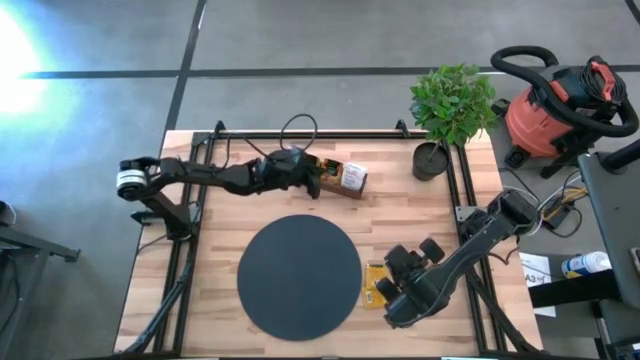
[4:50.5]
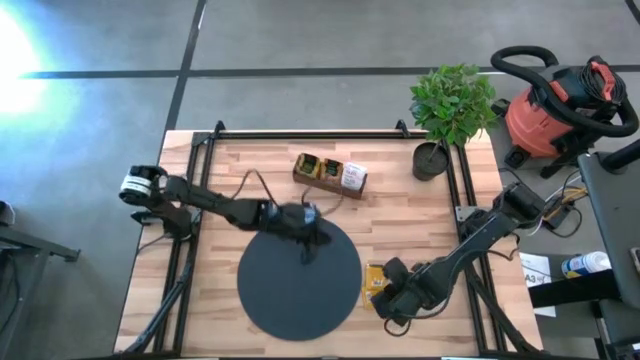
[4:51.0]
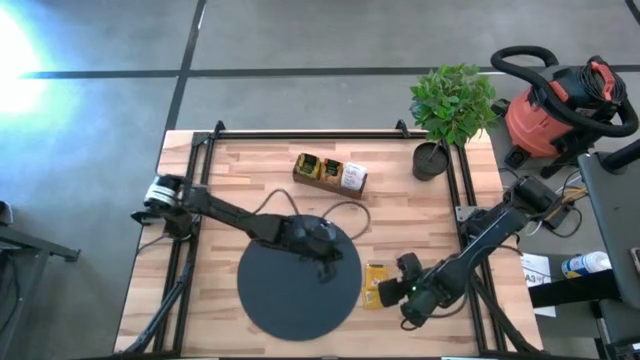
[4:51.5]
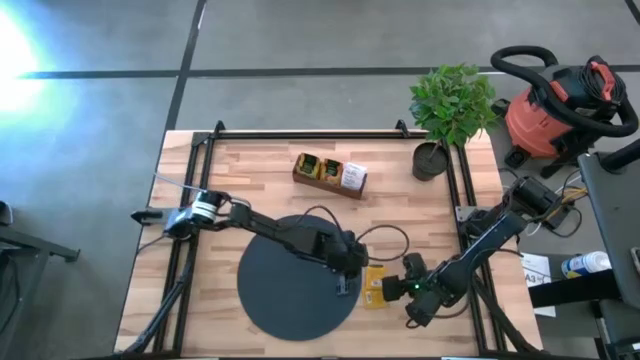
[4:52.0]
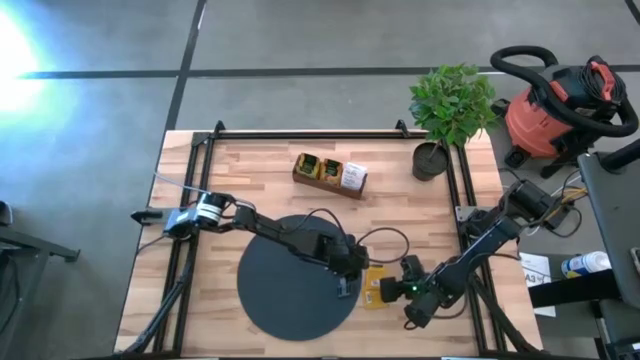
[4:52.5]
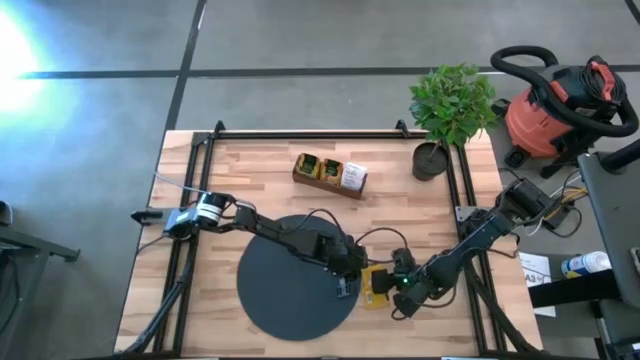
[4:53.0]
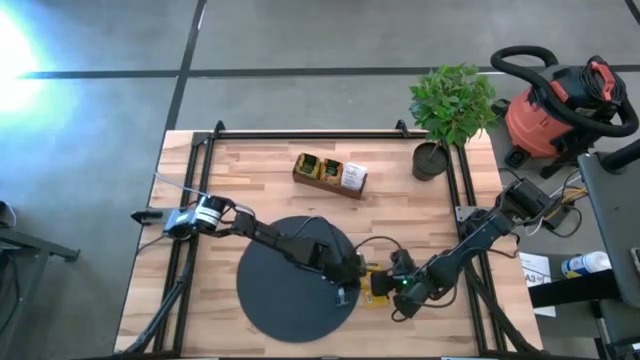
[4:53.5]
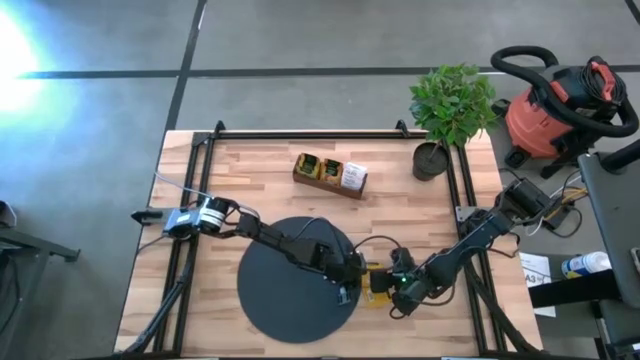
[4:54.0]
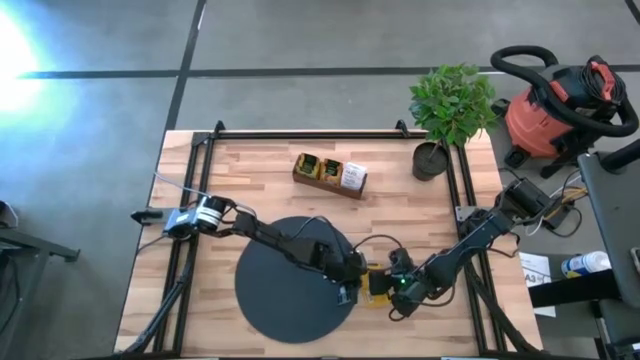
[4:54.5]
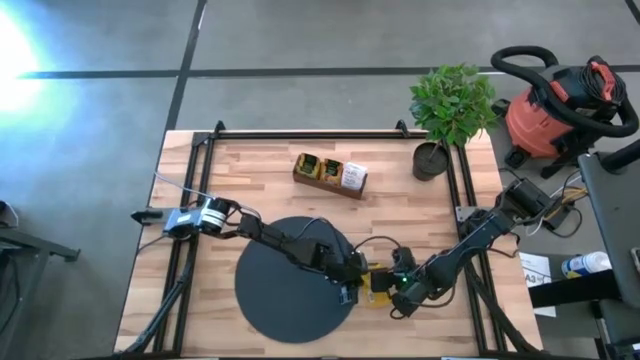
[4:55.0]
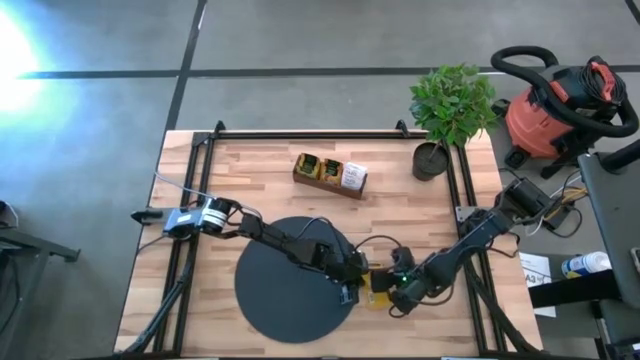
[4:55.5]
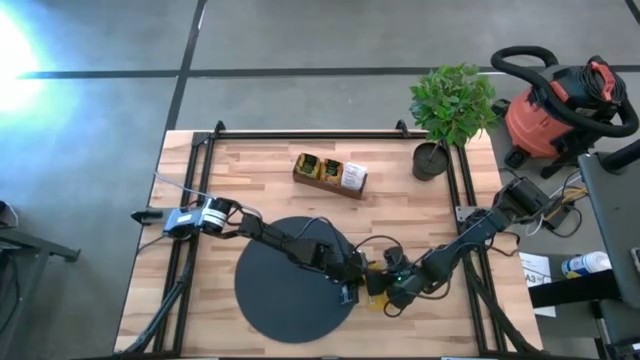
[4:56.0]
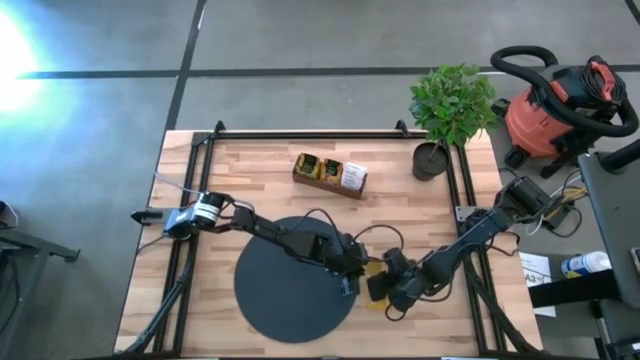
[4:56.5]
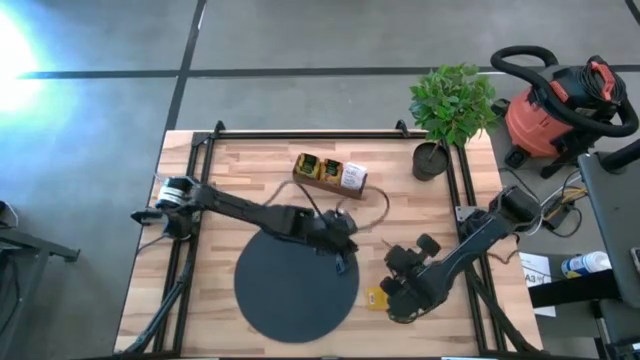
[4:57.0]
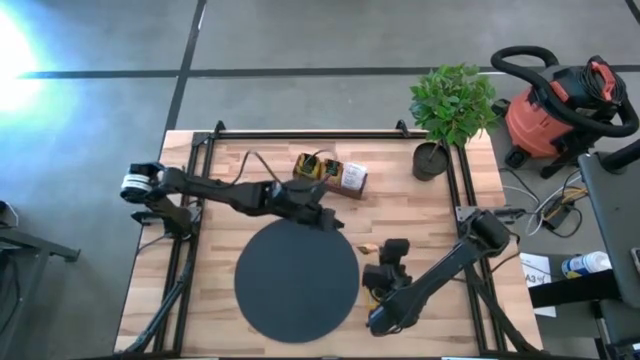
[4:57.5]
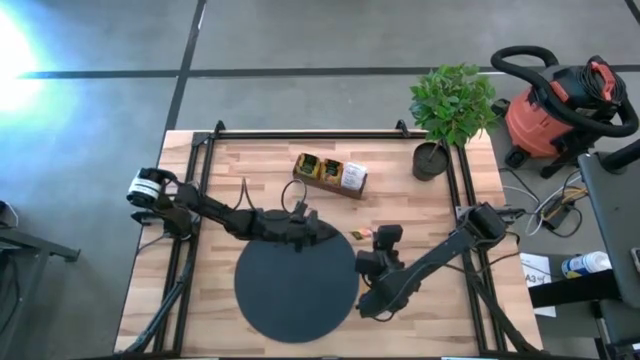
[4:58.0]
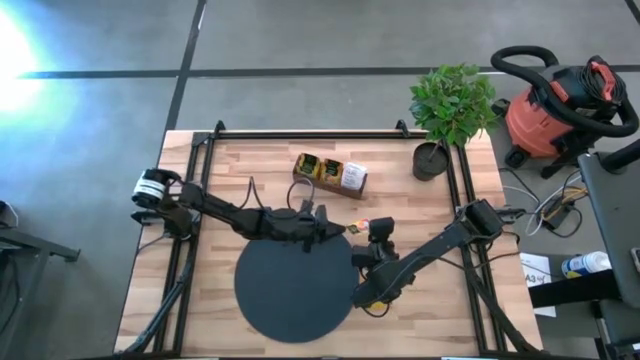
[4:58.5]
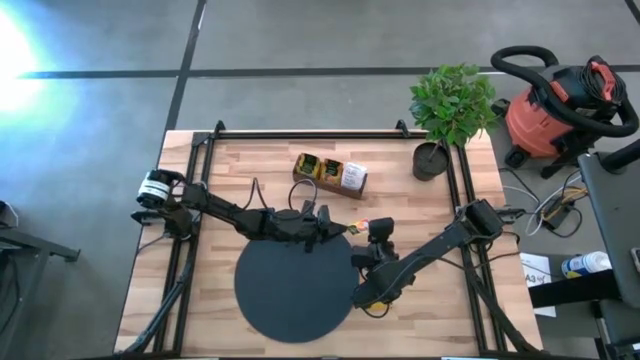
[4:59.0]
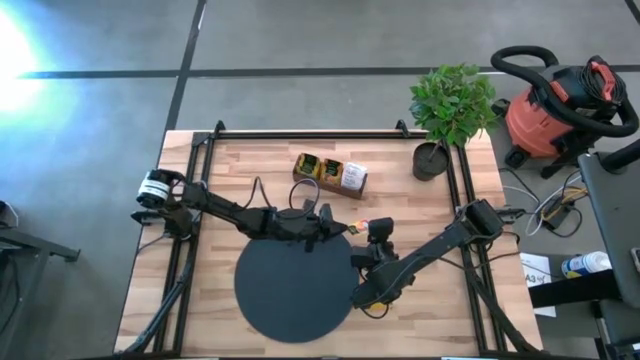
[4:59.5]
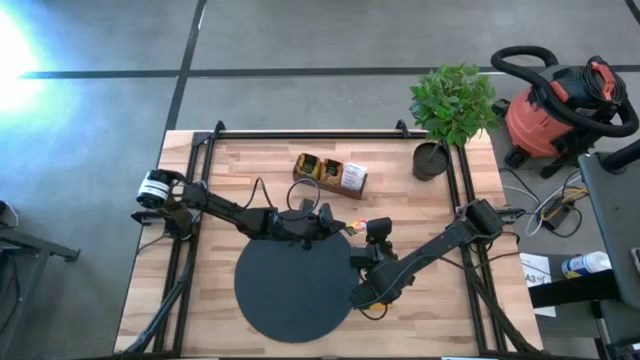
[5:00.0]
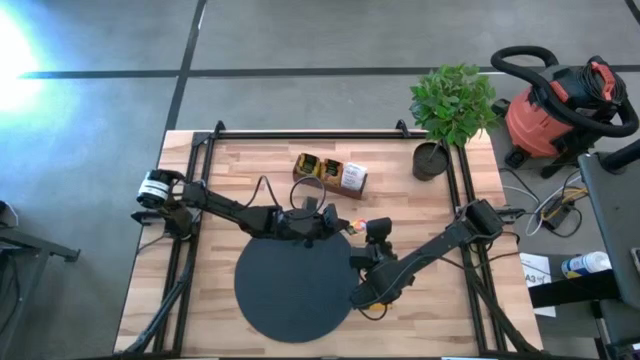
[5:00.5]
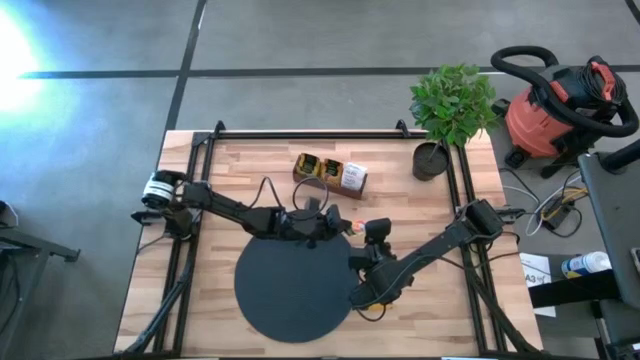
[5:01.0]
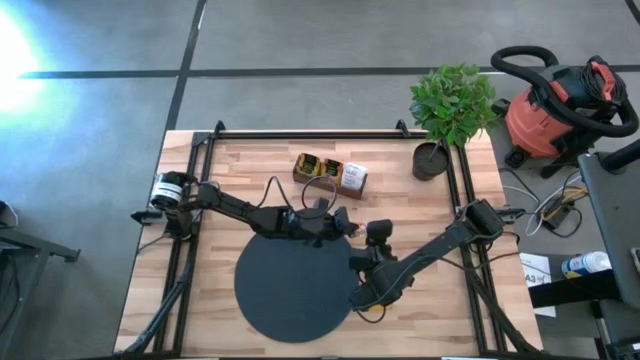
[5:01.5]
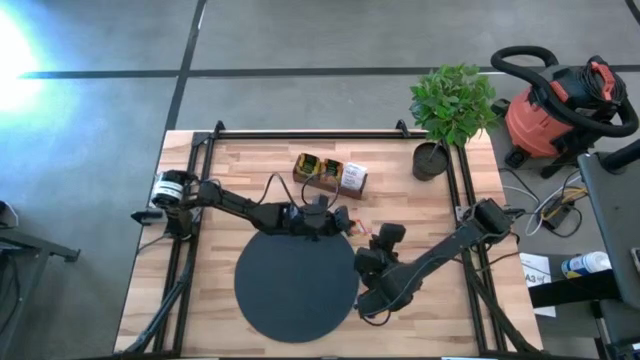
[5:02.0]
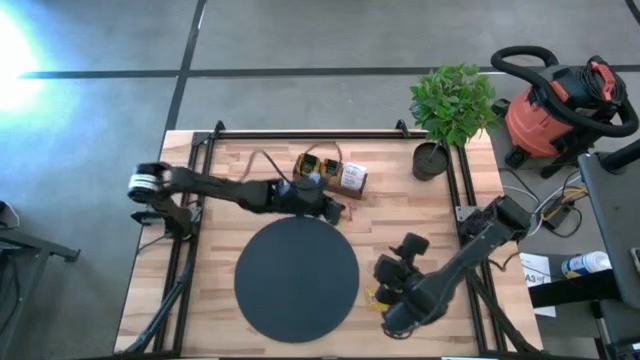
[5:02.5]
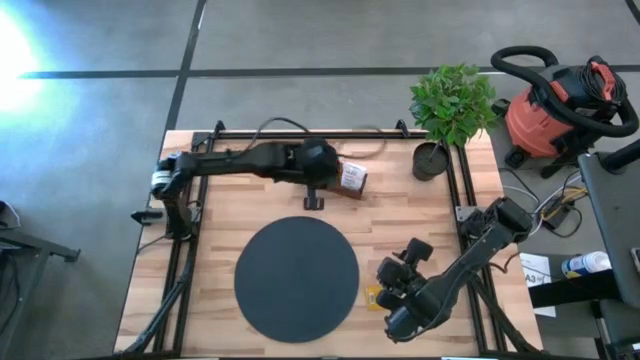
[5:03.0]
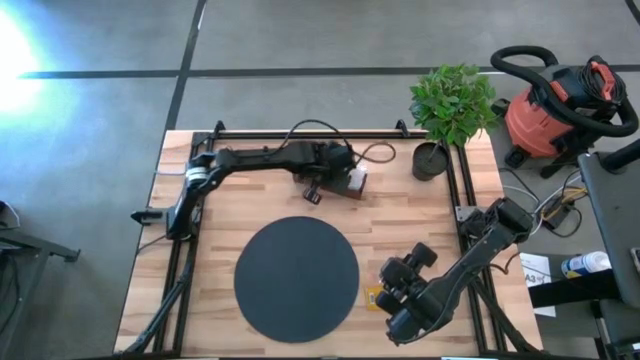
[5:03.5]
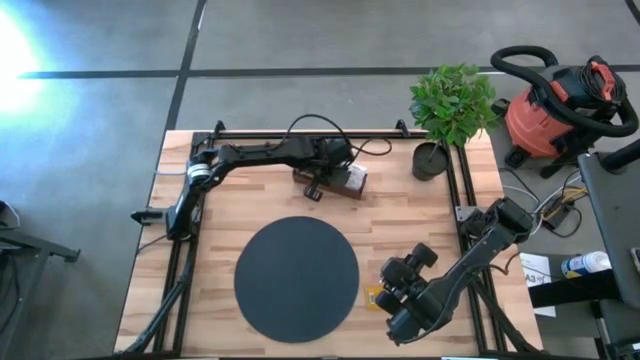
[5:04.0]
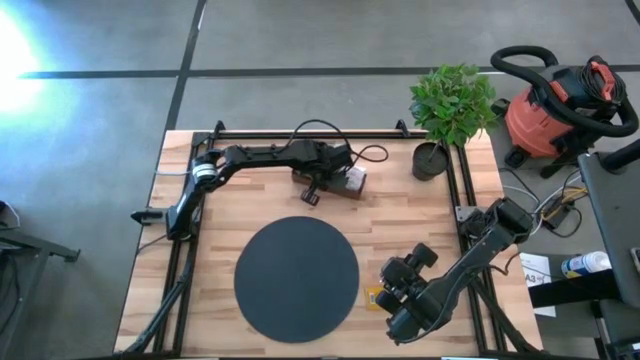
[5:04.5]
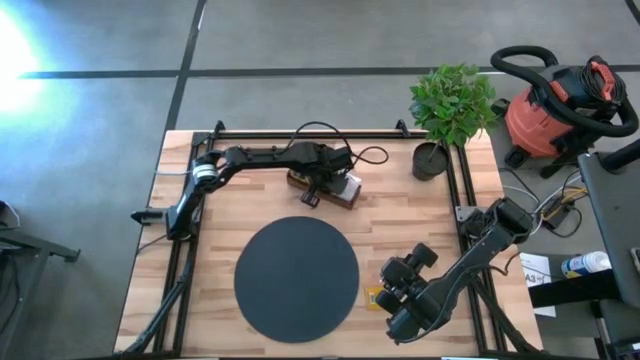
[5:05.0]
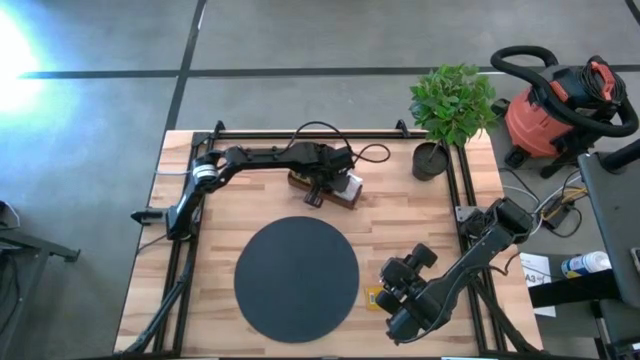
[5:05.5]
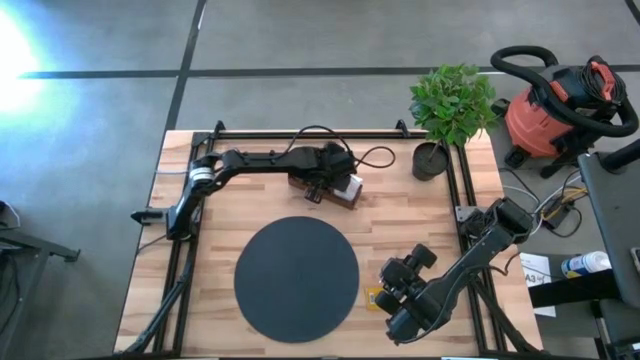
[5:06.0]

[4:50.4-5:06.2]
Task: Pick & Place Tea
Put the top orange tea bag into the middle section of the wooden organizer

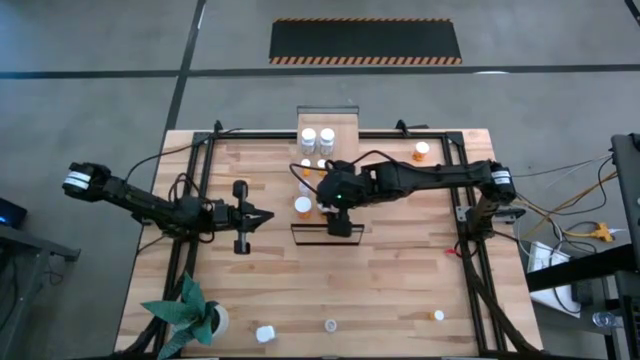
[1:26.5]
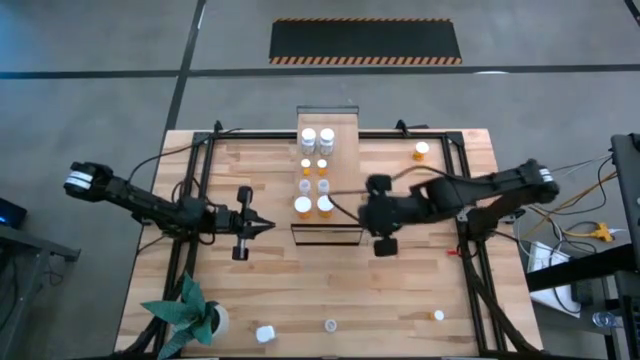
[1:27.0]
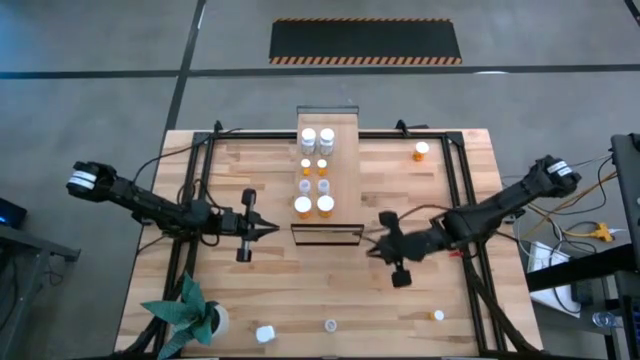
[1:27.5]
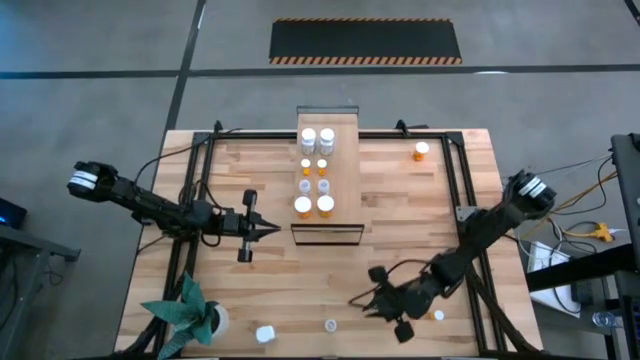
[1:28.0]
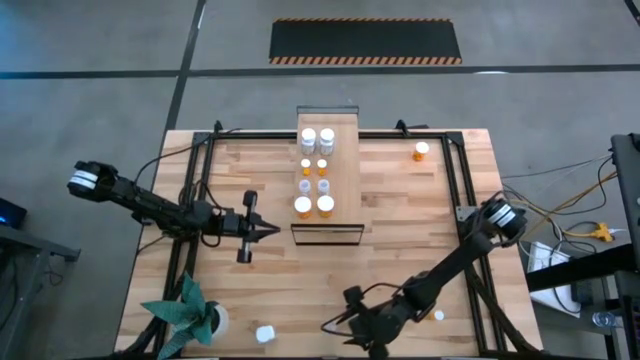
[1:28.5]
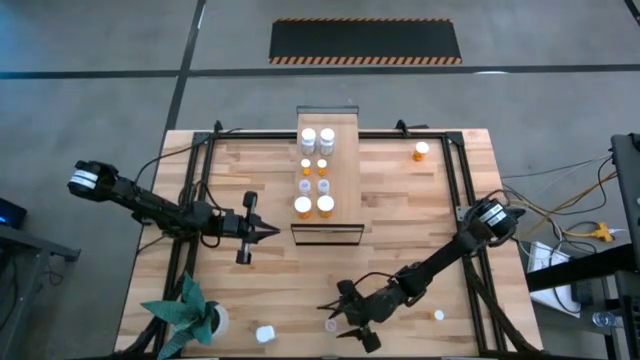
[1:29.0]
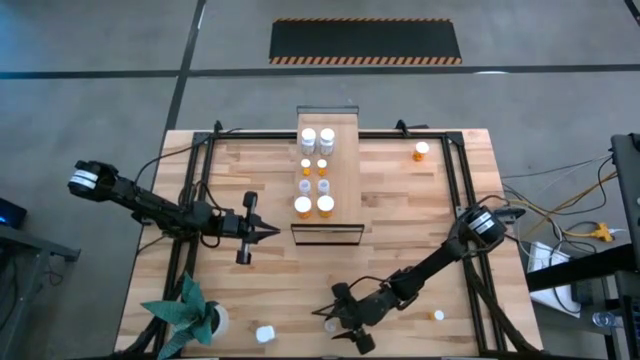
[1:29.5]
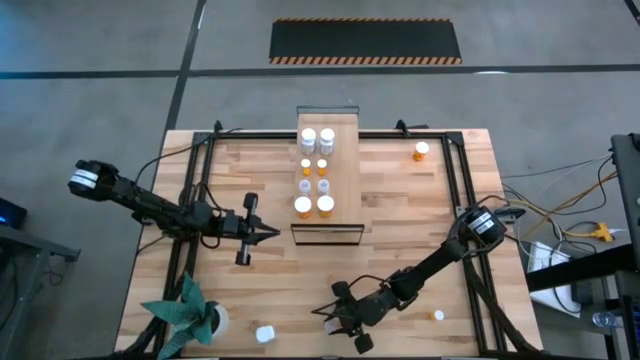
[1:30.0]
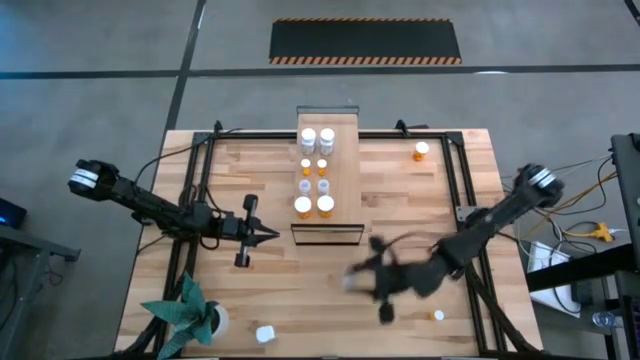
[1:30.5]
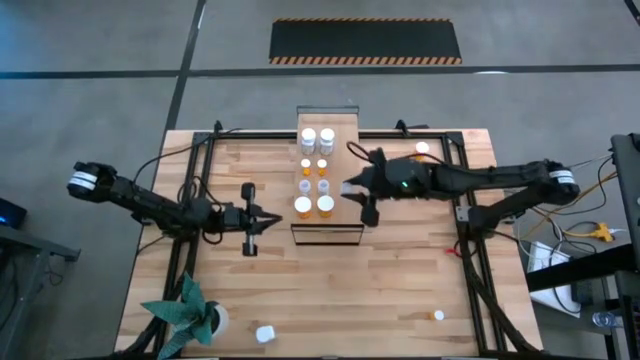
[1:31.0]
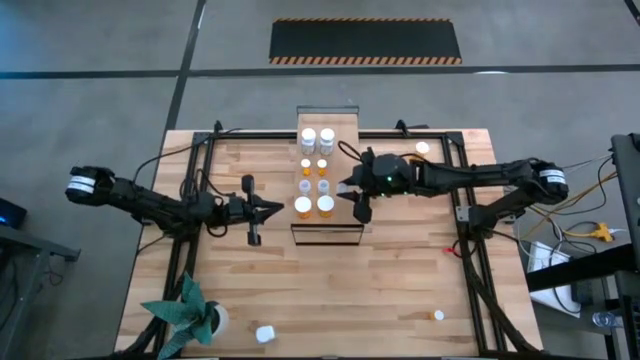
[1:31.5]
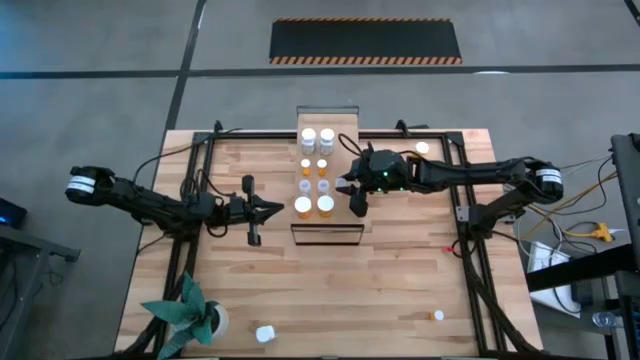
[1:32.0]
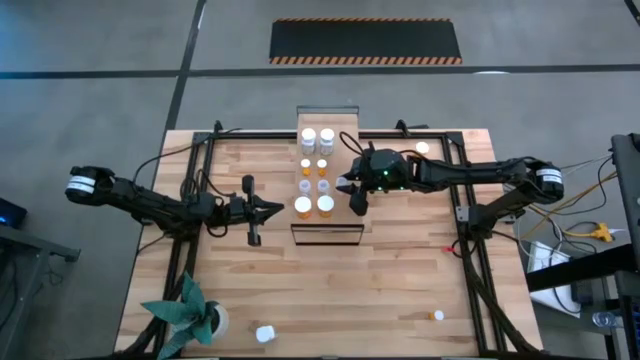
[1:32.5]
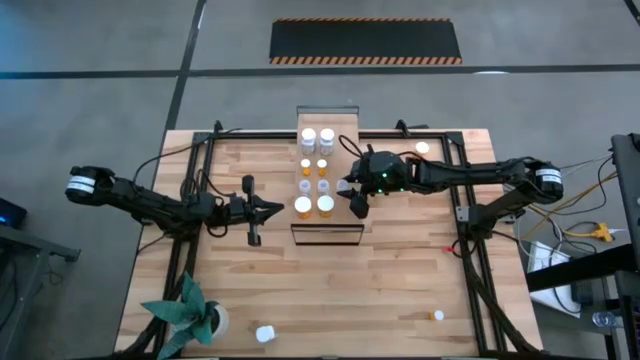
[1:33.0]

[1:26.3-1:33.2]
Task: Pick and place medicine bottles onto shelf by color
Put the transparent pill bottle aligned with the other transparent pill bottles on the shelf
